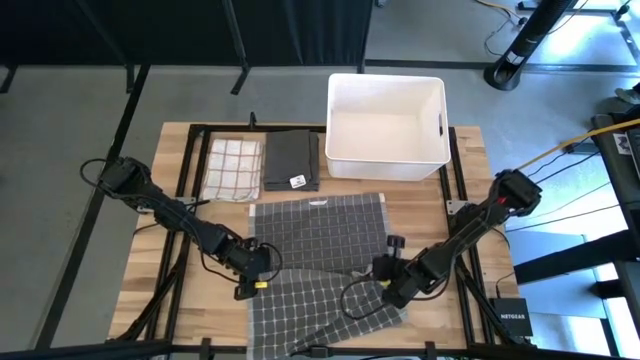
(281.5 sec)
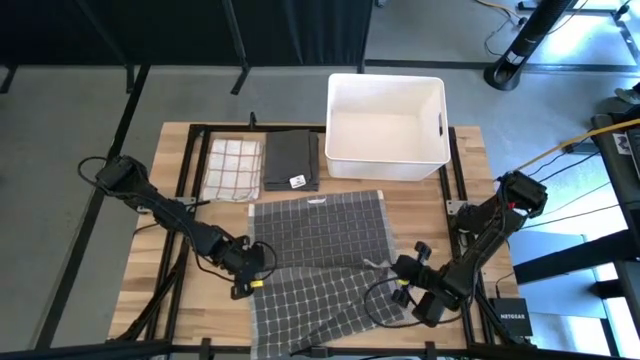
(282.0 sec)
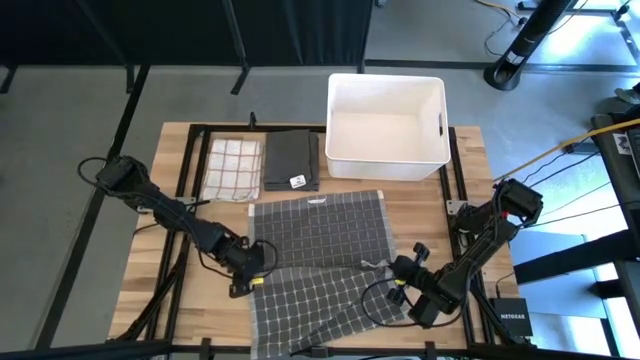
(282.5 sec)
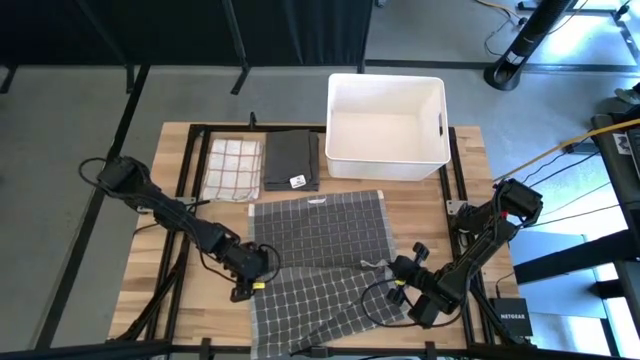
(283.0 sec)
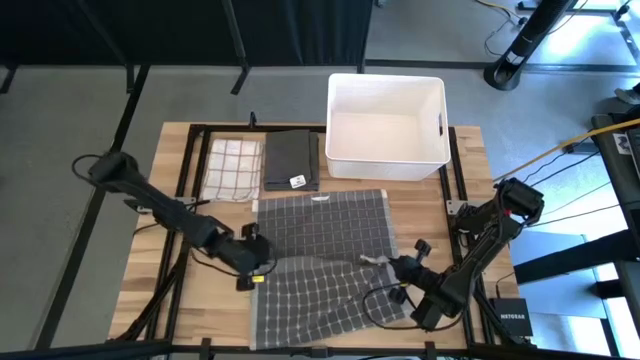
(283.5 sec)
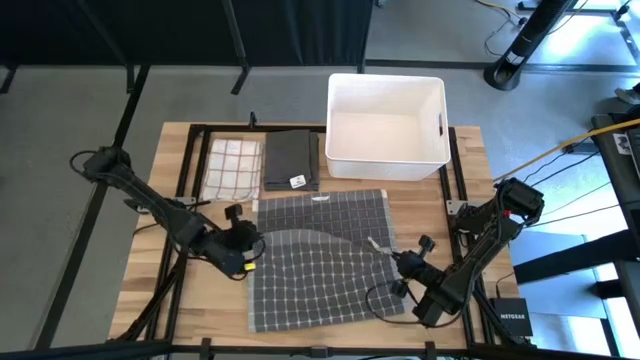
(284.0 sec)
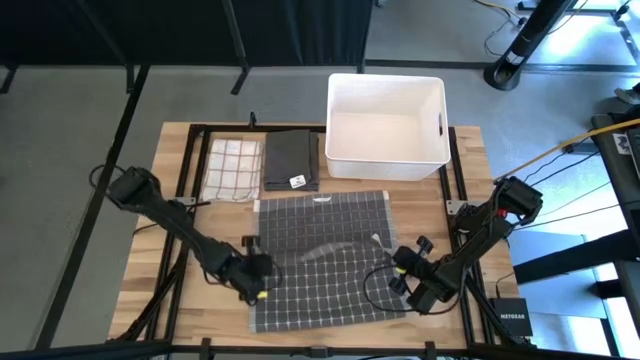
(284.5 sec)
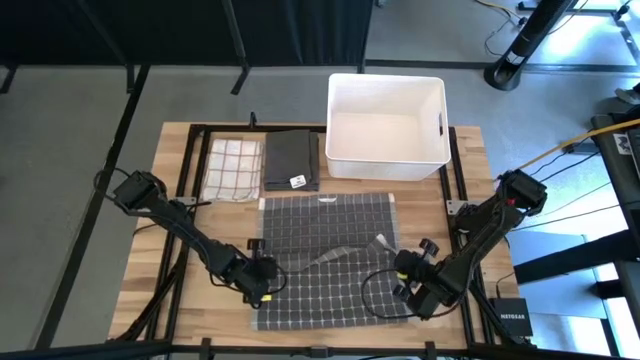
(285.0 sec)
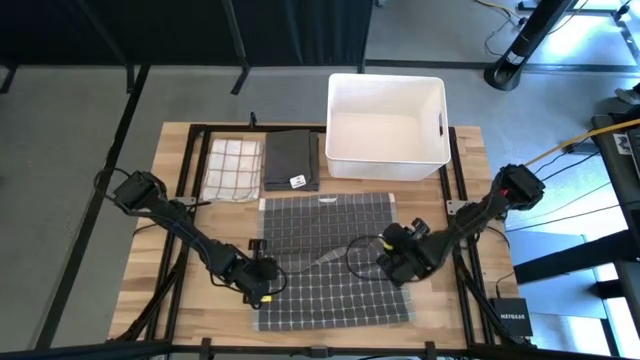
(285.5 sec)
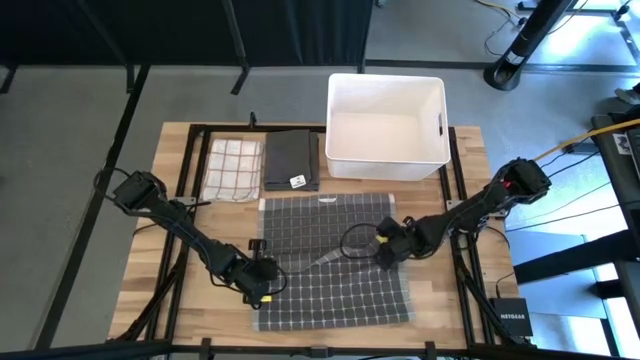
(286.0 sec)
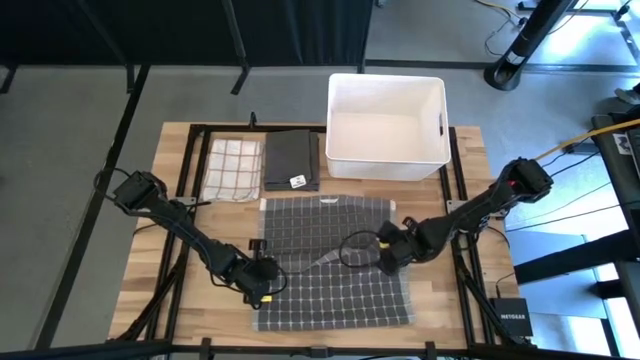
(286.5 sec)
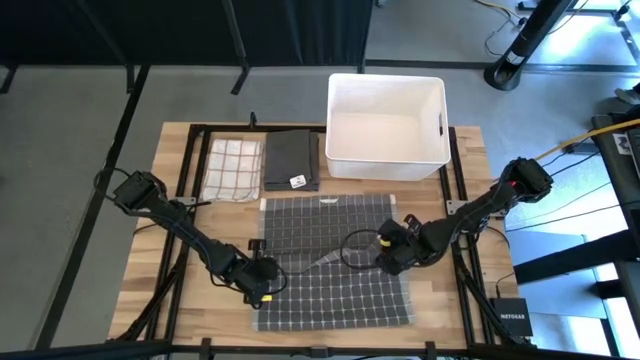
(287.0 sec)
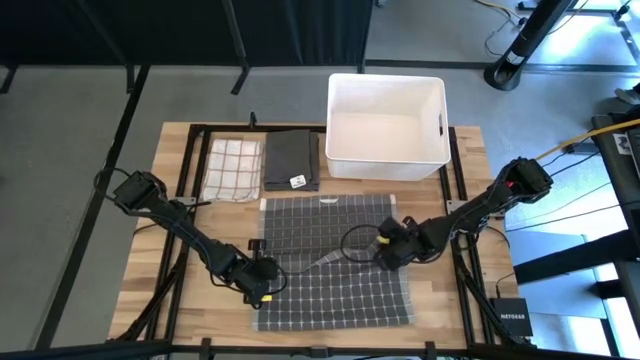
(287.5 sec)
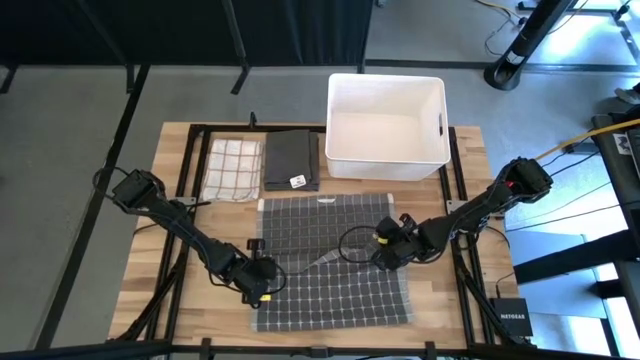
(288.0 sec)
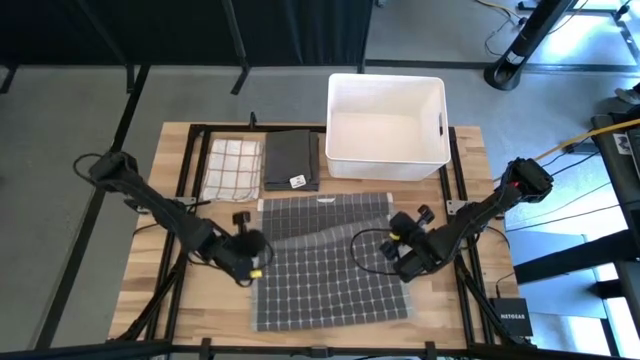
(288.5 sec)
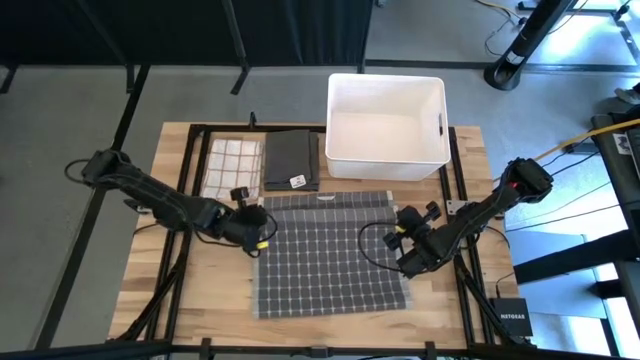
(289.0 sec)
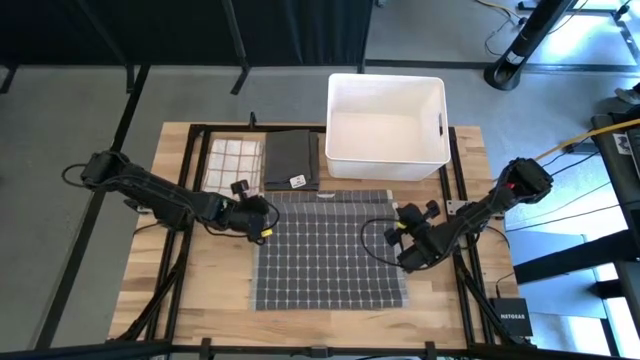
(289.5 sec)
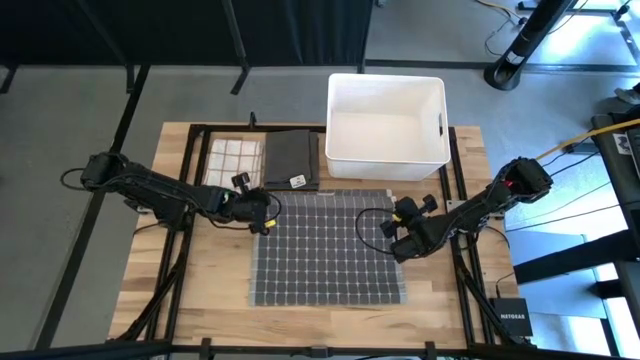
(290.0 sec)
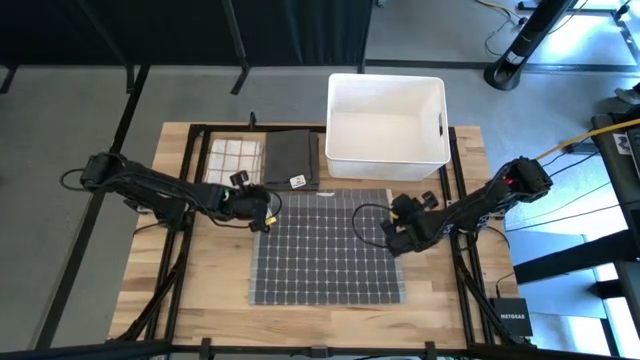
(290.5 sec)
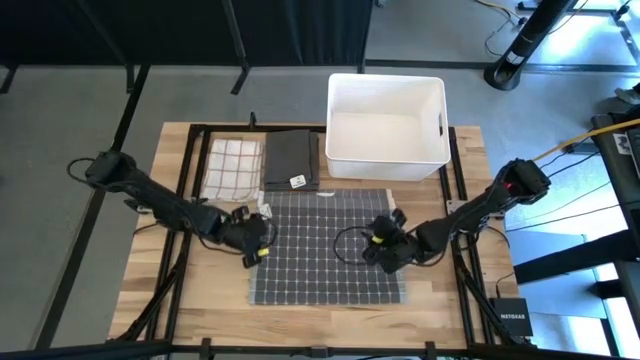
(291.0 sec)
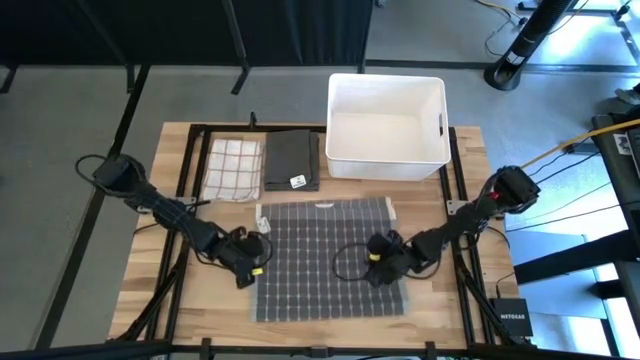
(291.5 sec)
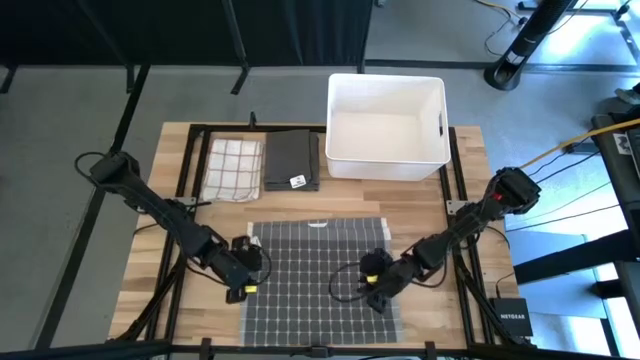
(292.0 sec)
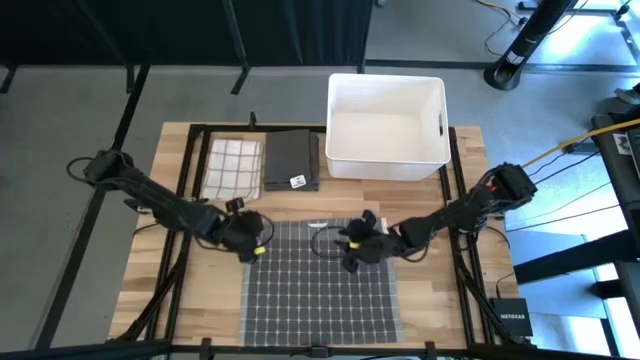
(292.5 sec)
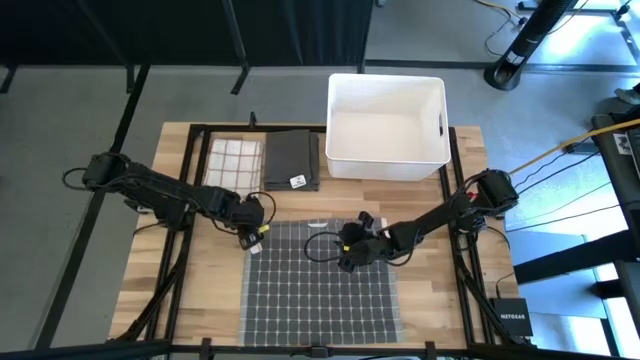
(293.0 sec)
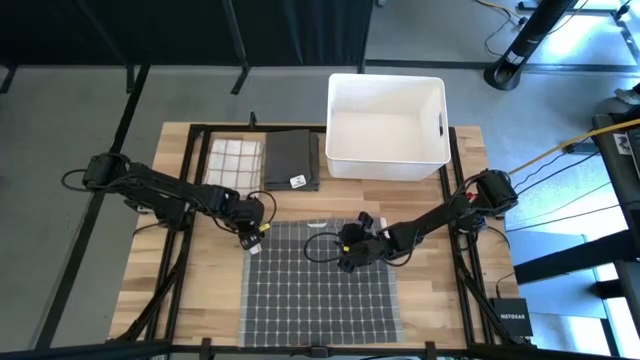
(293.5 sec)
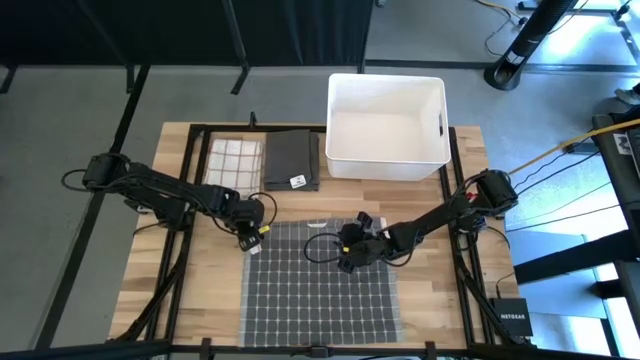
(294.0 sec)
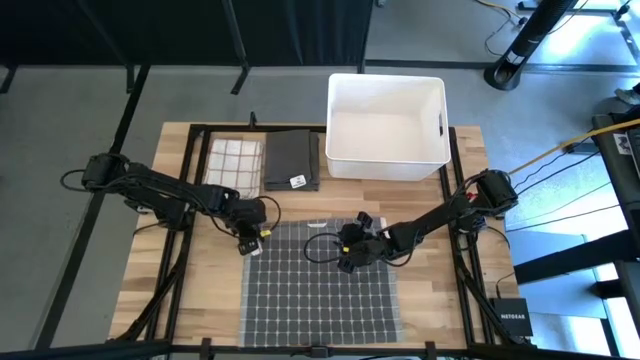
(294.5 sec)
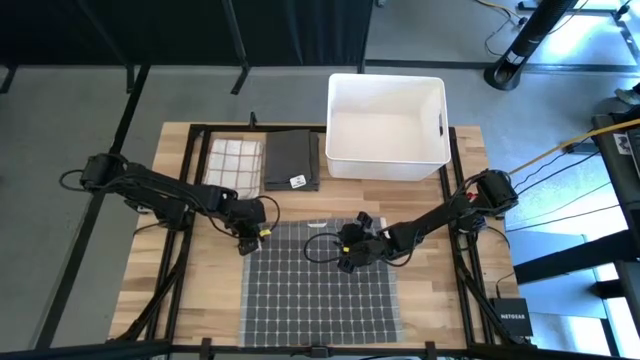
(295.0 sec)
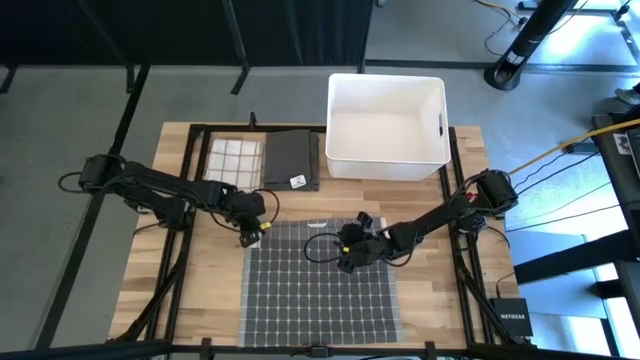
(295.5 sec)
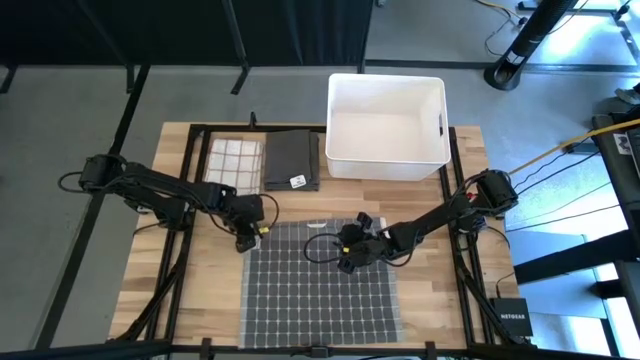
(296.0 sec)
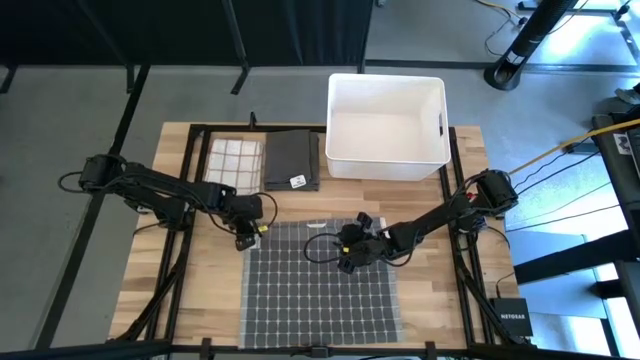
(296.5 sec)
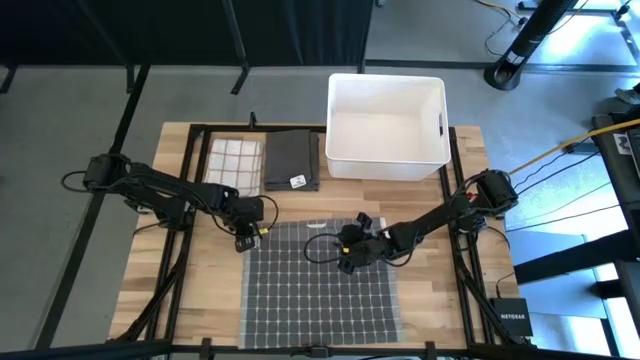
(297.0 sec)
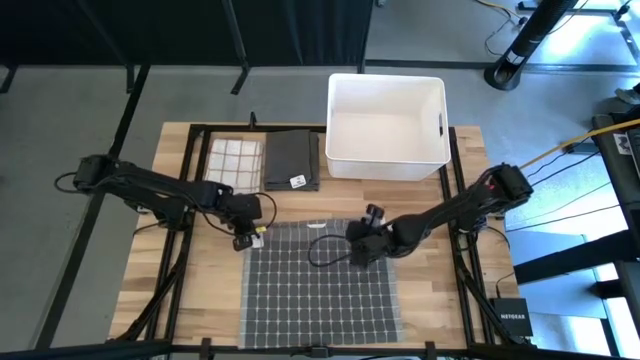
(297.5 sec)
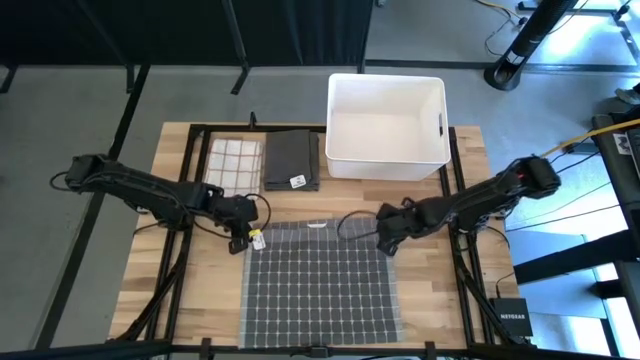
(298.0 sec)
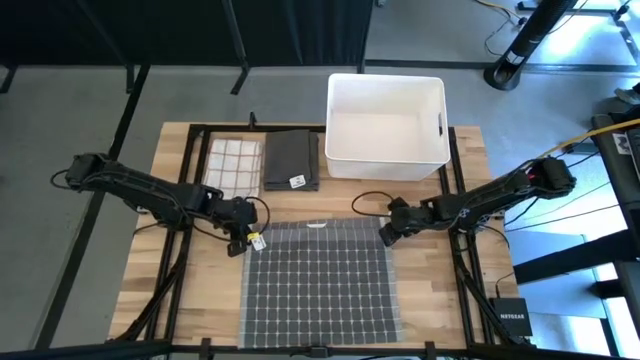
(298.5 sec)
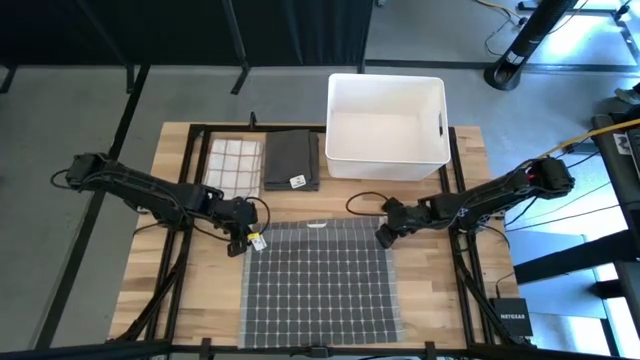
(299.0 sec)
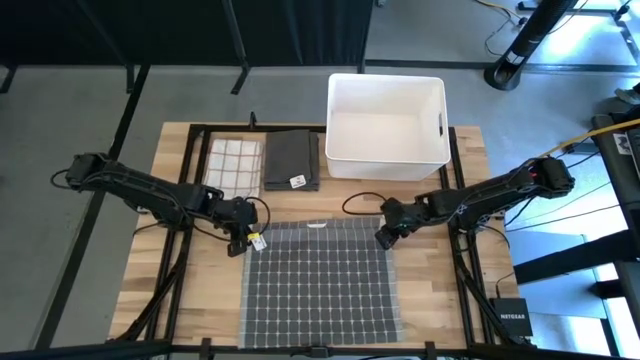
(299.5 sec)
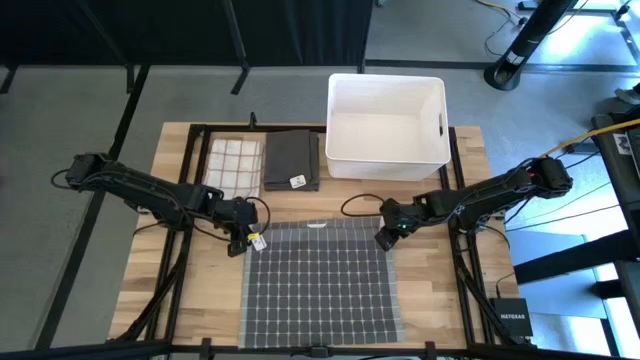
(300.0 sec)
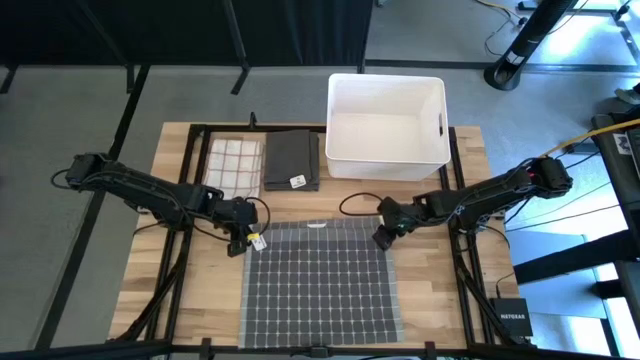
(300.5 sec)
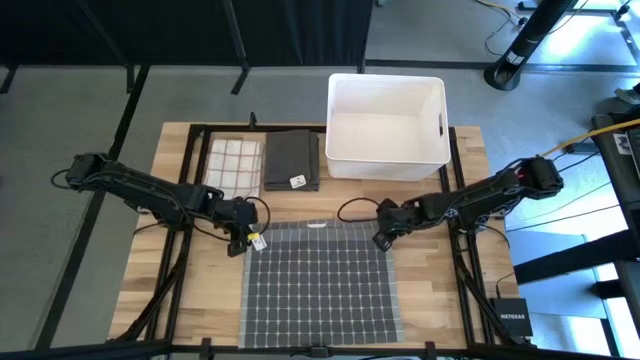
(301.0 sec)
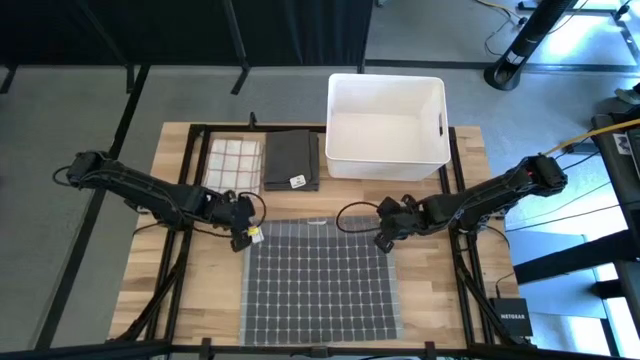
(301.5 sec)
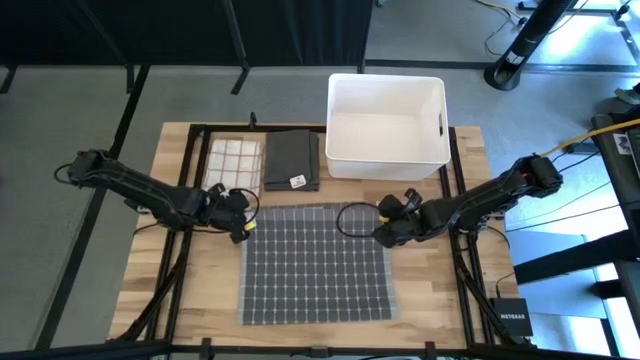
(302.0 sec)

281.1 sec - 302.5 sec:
Task: Fold towel
Fold the grey patterned towel

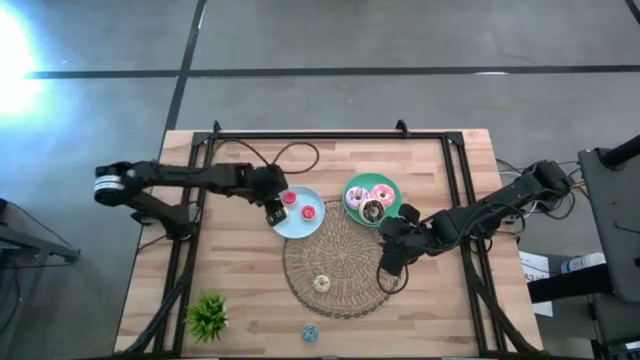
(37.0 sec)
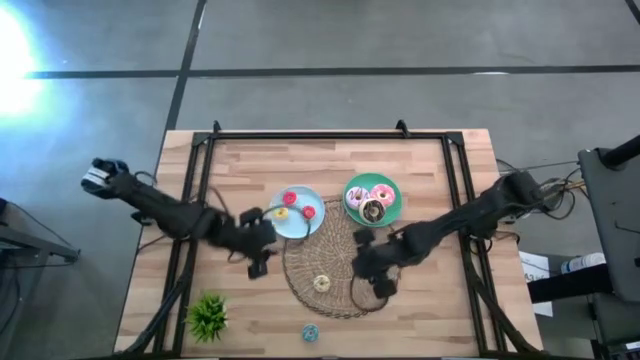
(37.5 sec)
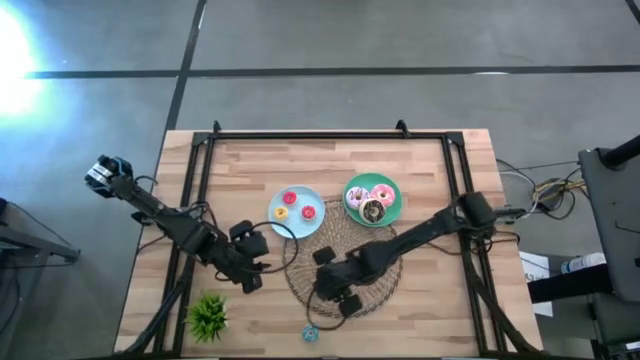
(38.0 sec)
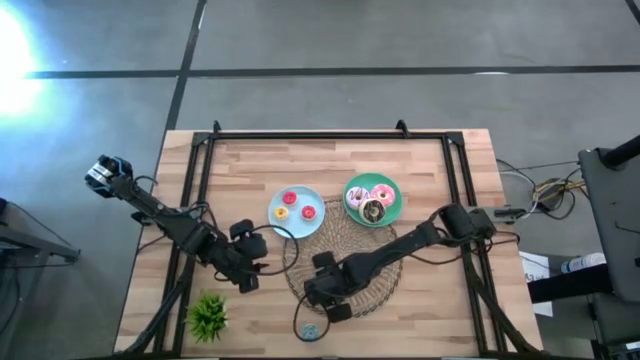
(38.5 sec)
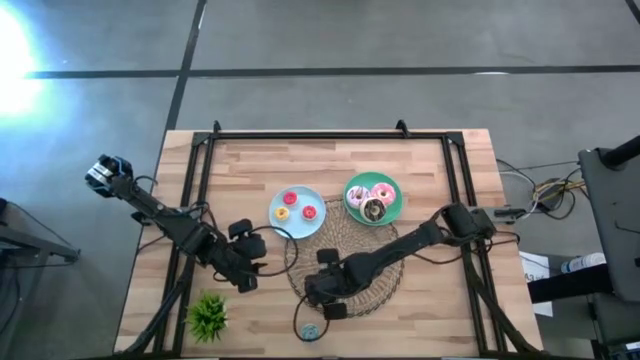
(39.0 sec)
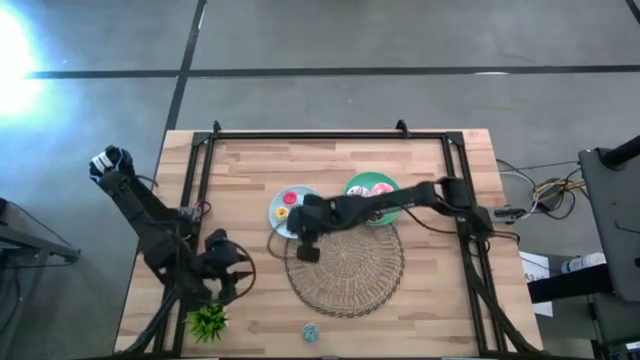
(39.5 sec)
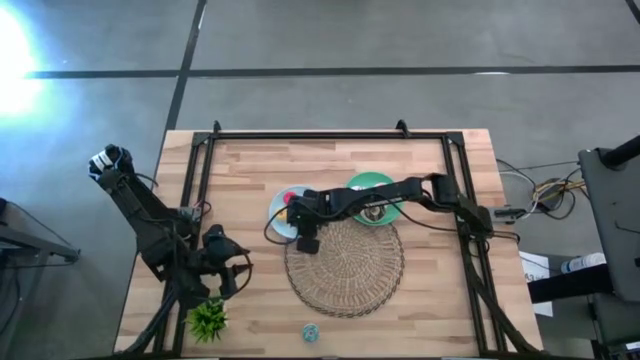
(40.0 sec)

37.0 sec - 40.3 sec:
Task: Pick & Place donuts
Put the small white donut on the blue plate
